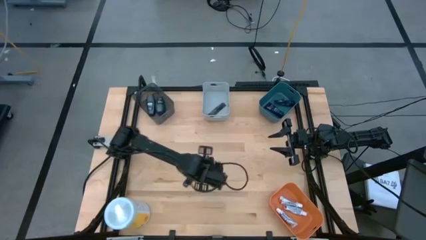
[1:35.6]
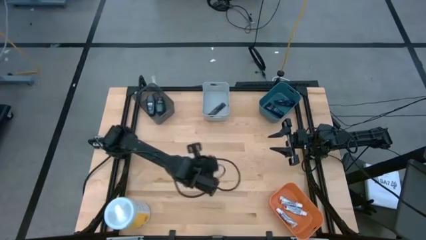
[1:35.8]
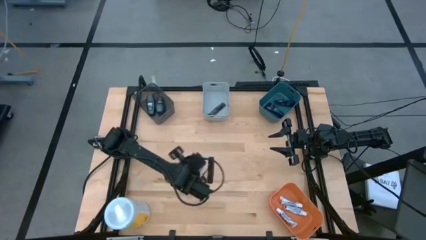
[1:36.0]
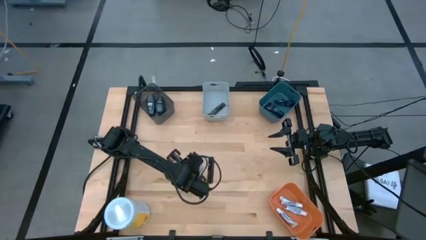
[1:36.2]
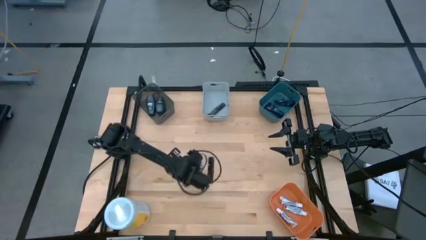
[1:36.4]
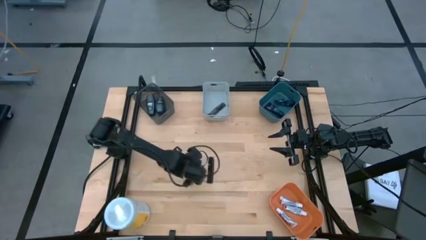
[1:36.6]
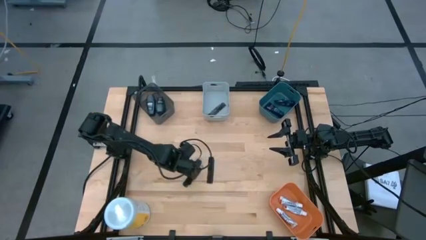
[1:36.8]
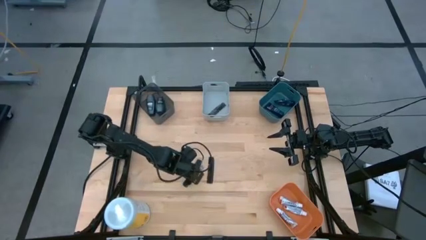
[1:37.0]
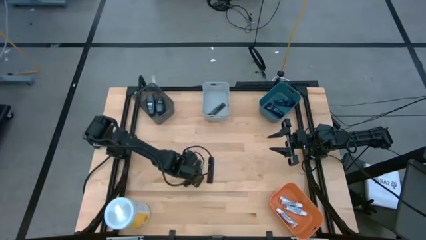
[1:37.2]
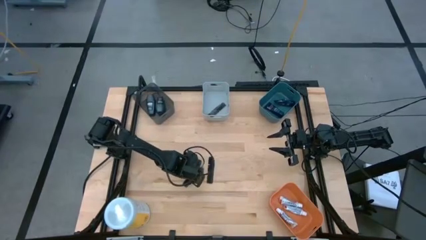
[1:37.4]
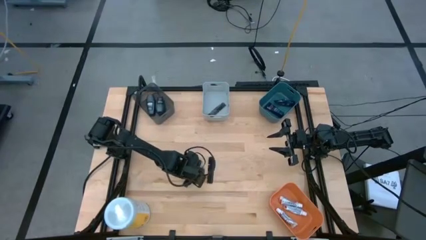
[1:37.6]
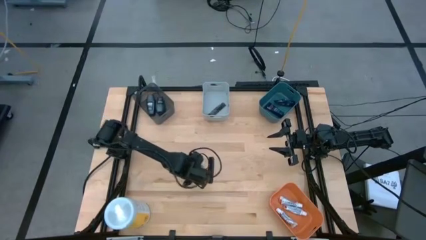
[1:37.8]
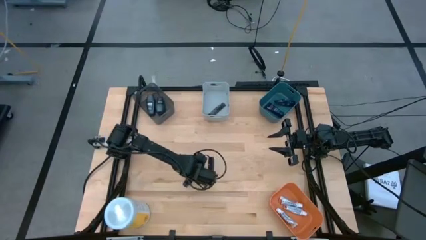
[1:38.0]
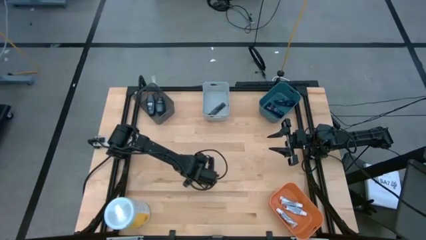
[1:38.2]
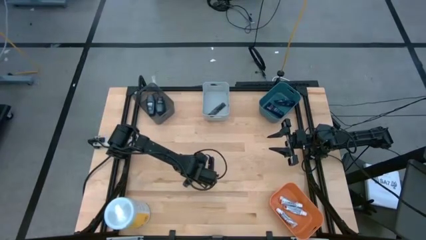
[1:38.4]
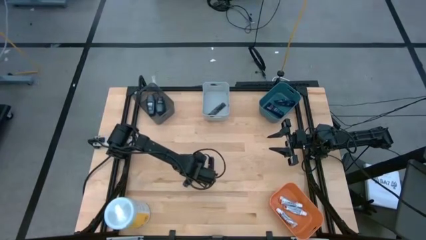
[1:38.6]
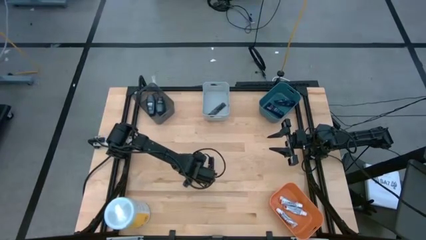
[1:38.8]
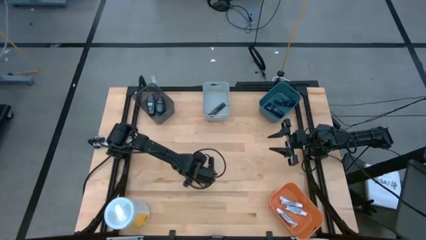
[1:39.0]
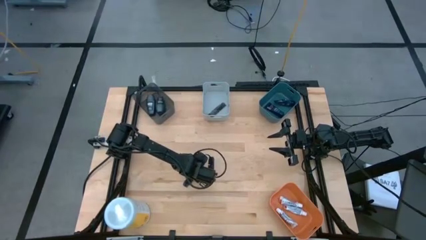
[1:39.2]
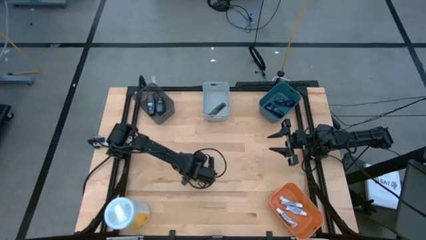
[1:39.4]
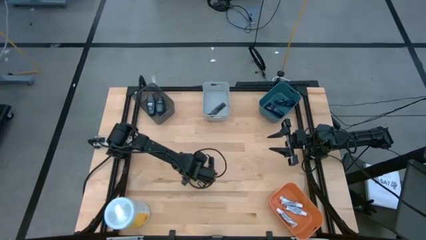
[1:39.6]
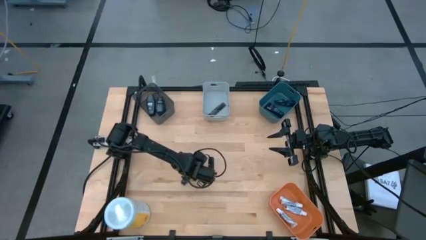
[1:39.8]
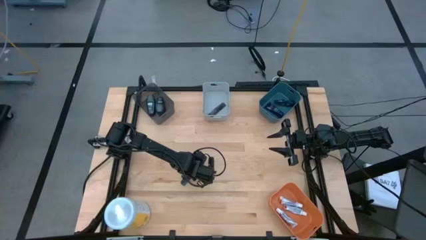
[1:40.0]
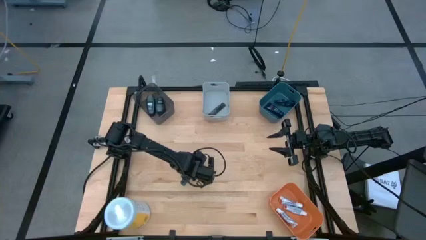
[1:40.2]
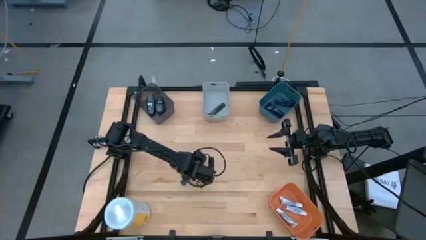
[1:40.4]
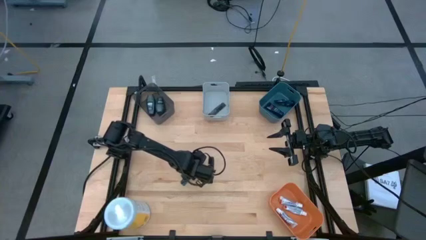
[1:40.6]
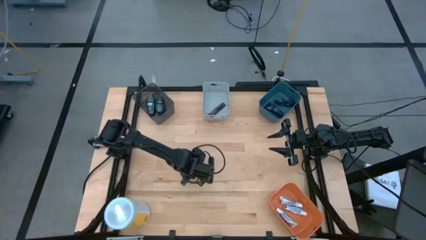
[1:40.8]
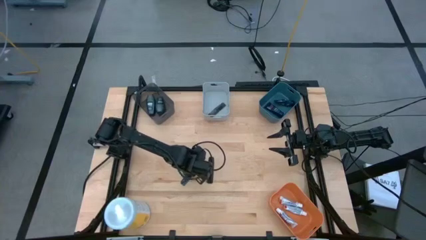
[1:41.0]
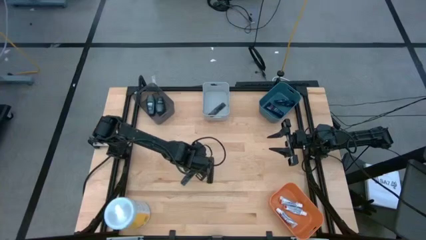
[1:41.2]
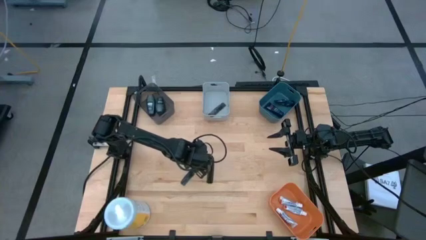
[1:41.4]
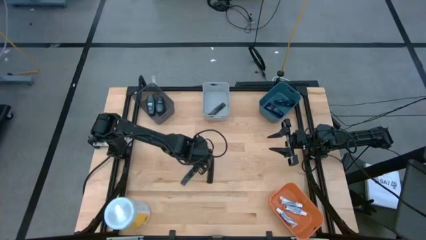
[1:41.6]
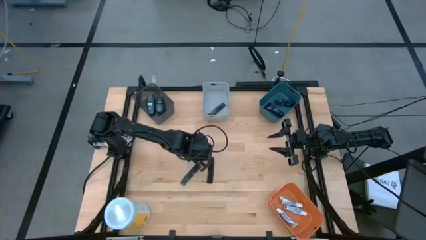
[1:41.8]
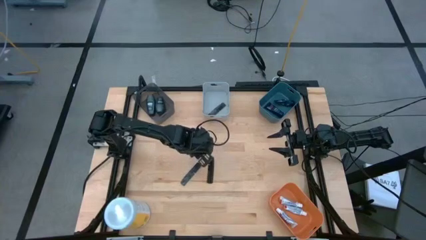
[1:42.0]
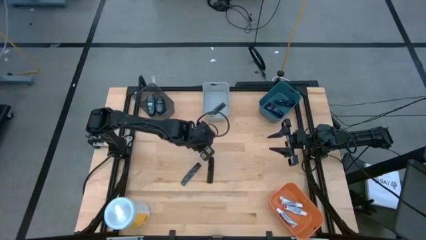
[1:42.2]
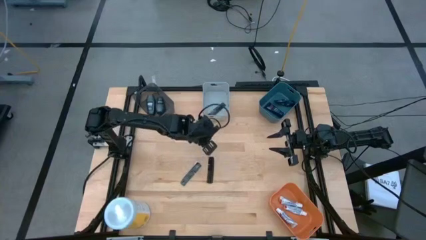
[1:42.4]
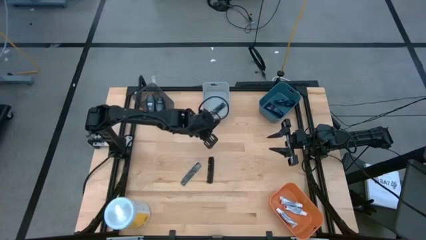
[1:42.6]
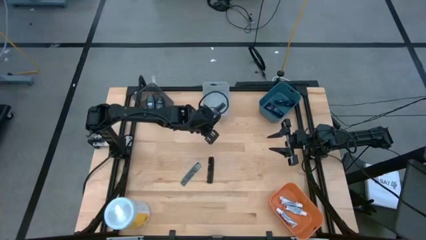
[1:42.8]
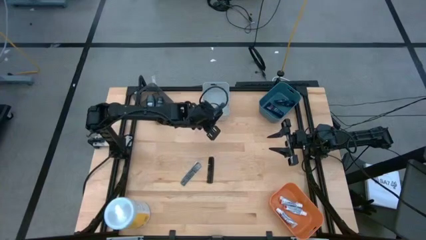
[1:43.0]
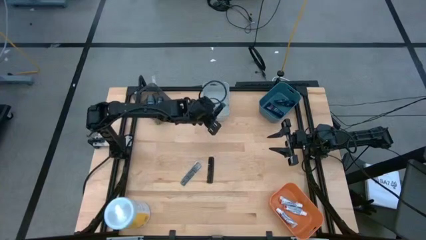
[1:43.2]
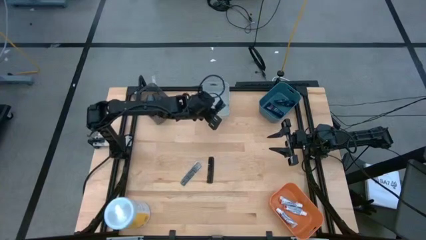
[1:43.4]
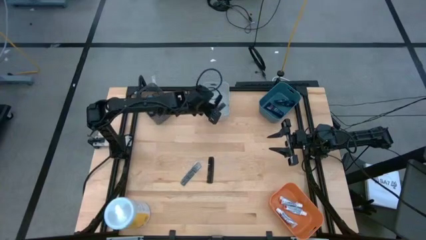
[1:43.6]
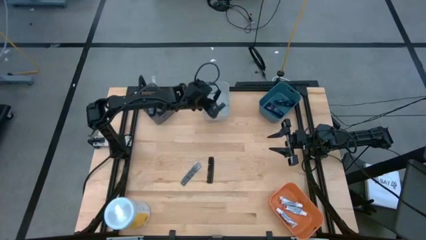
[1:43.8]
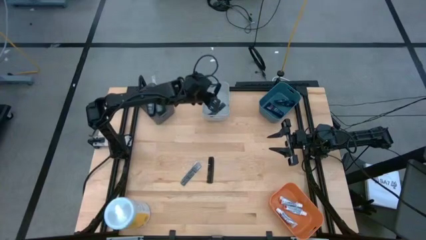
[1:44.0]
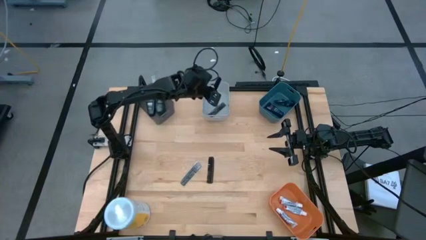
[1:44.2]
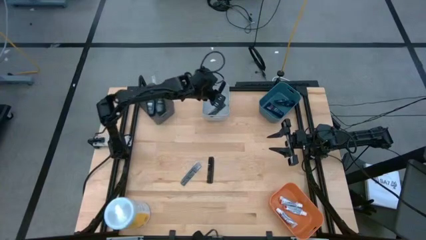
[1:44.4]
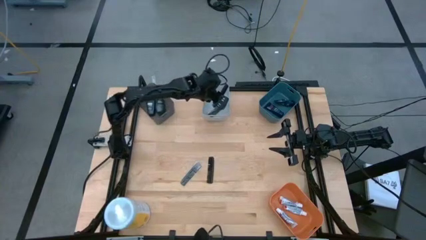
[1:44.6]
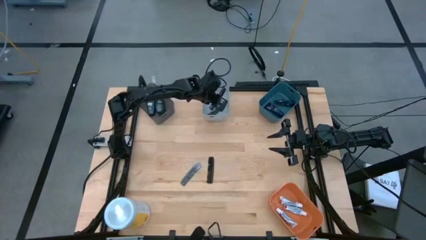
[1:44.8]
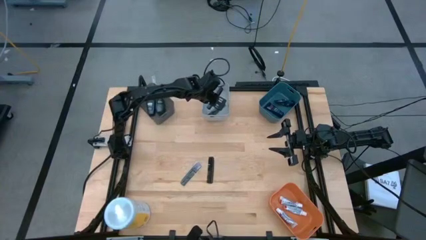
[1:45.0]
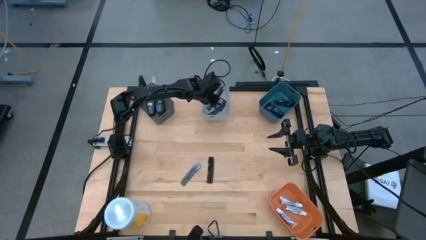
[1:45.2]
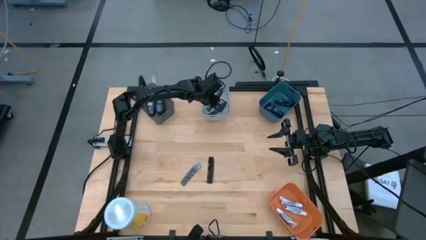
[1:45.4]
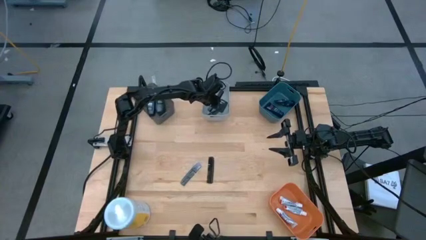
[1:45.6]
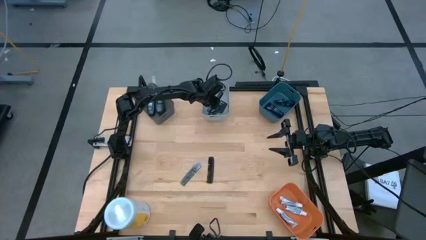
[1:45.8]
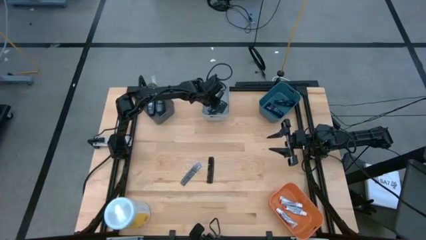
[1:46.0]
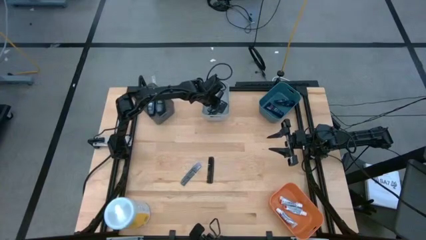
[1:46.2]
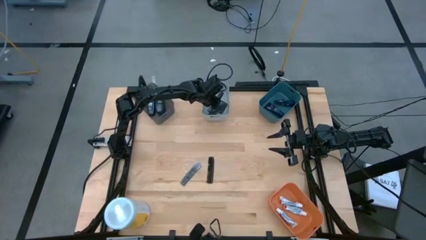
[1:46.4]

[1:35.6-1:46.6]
Task: Pick & Place Travel size toiletries
Put the black comb into the gray bin

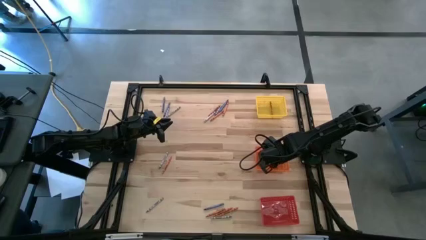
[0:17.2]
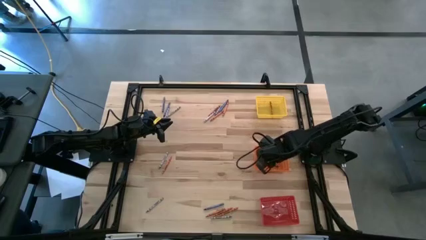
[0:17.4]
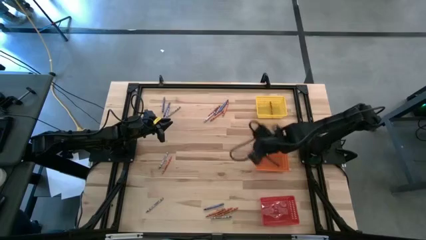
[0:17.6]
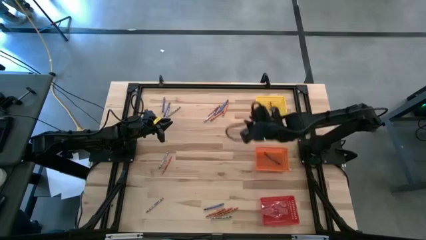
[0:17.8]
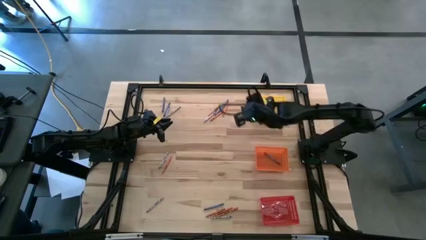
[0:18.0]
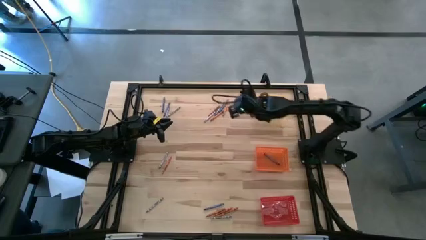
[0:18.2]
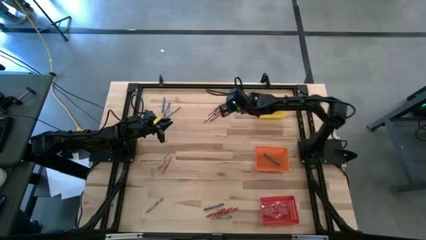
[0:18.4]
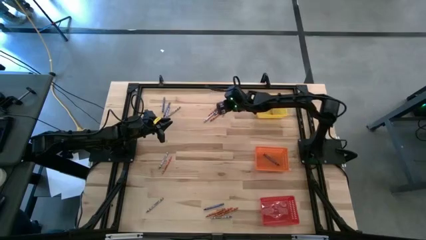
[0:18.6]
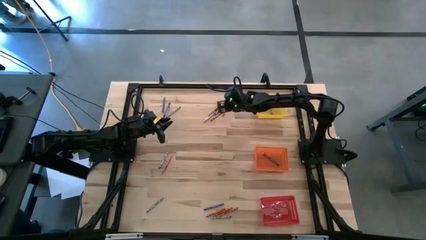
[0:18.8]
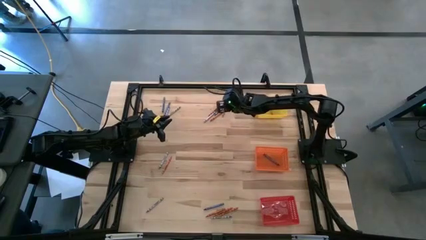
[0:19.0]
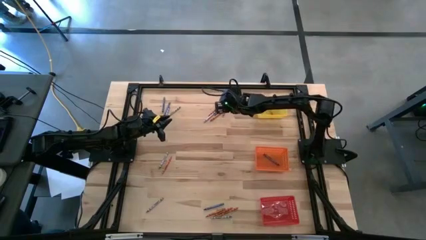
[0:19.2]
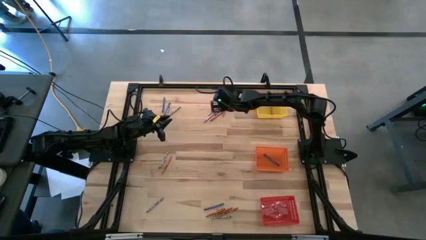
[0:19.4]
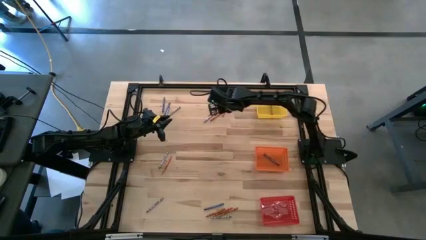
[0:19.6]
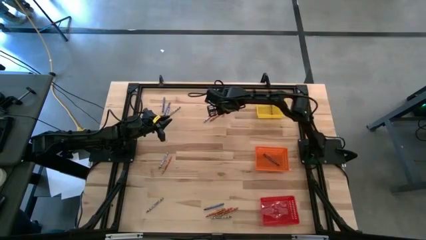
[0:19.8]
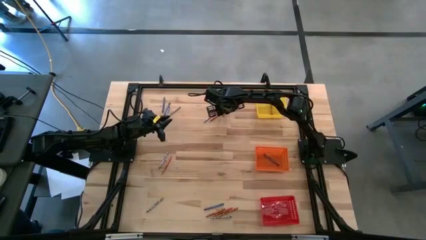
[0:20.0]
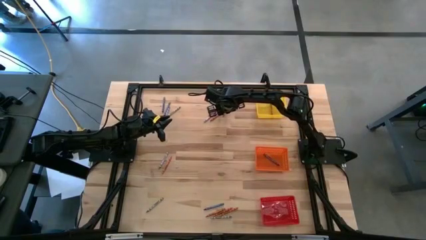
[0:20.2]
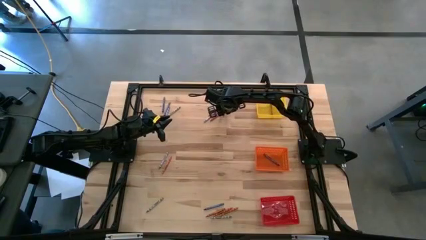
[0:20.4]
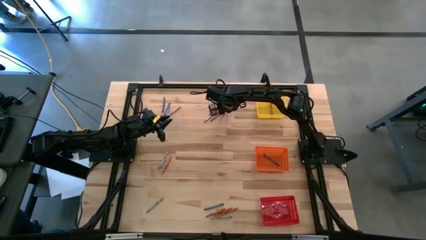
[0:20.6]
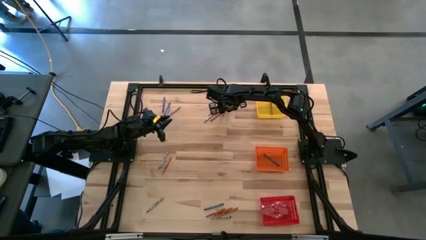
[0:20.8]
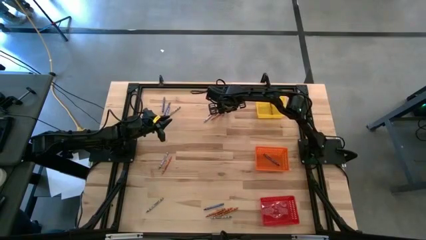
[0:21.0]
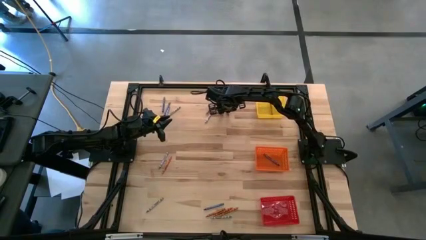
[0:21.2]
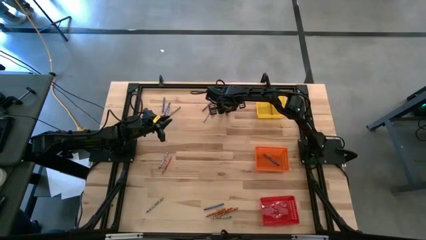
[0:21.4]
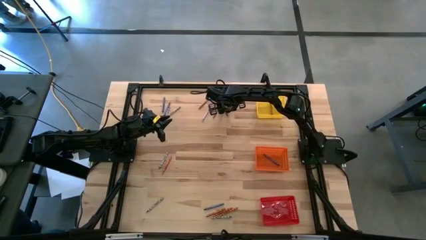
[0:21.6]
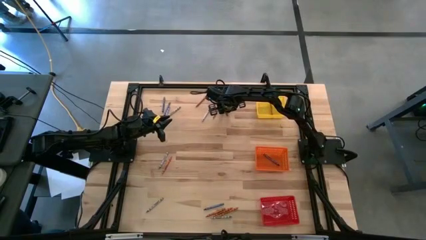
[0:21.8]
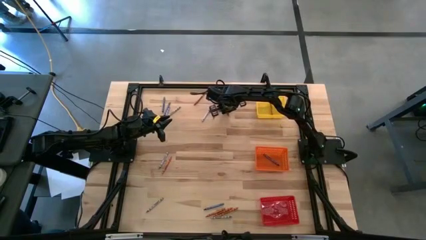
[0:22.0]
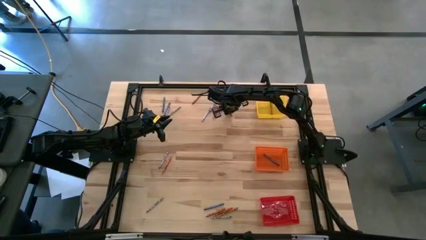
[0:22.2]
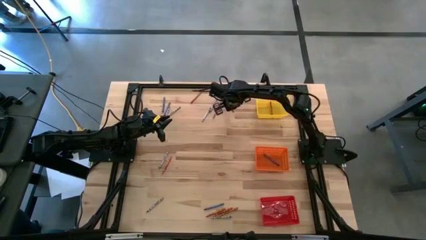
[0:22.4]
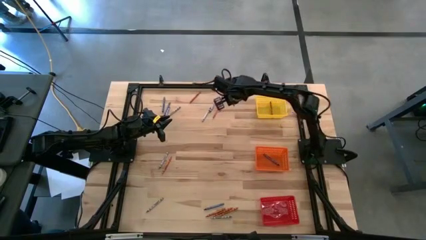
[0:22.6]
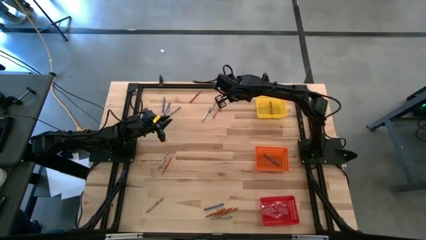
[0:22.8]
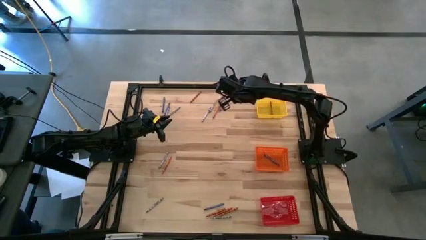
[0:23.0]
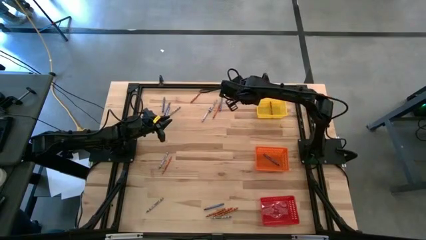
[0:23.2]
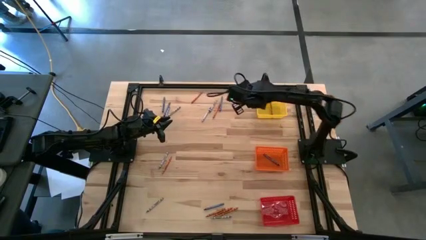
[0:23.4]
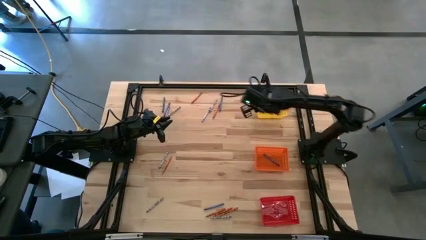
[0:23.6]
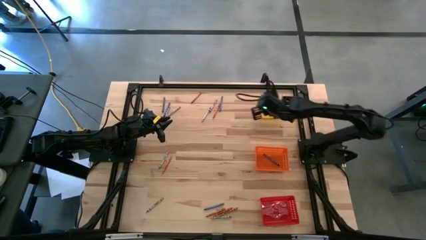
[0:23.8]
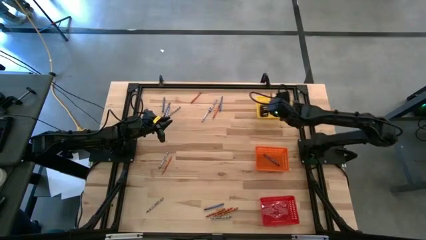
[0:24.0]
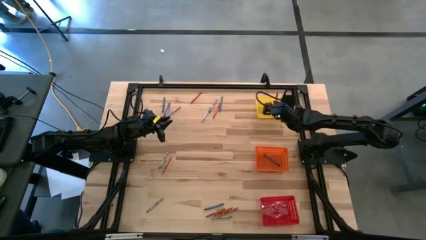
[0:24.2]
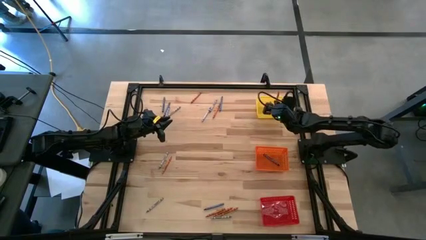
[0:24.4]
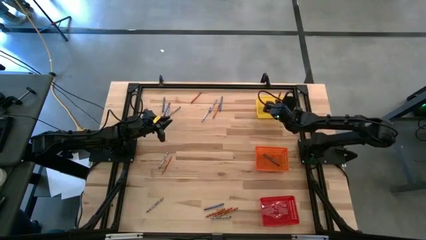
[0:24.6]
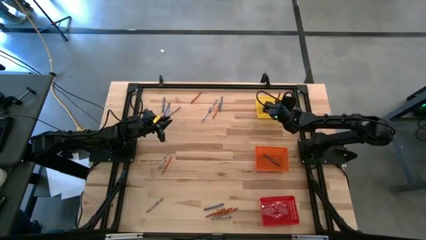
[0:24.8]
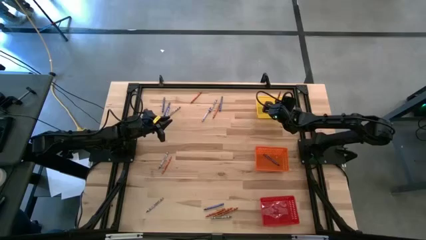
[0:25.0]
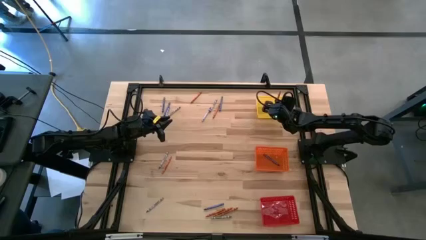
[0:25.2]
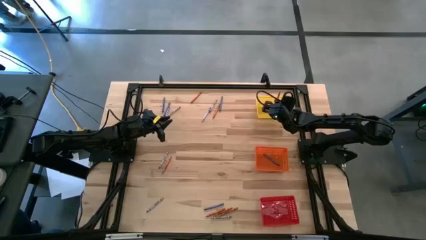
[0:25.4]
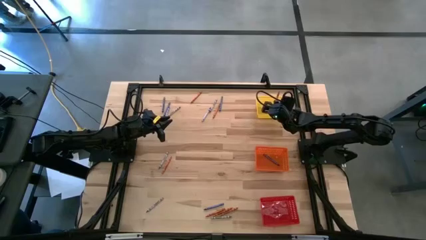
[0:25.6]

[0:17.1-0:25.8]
Task: Sort crayons
Put the orange crayon into the yellow bin
